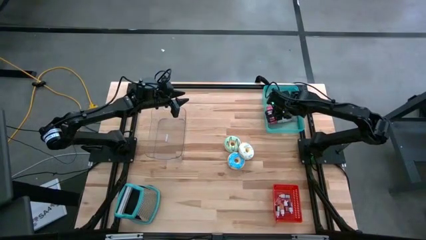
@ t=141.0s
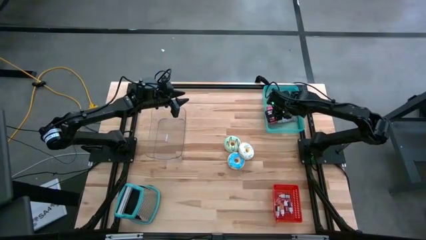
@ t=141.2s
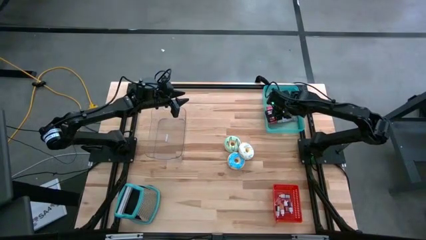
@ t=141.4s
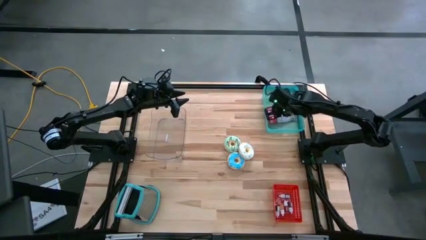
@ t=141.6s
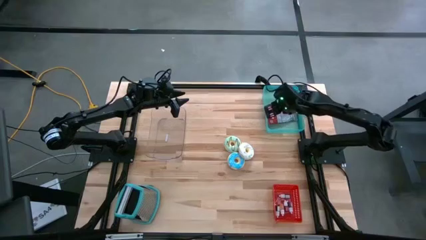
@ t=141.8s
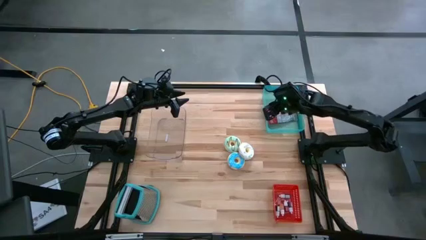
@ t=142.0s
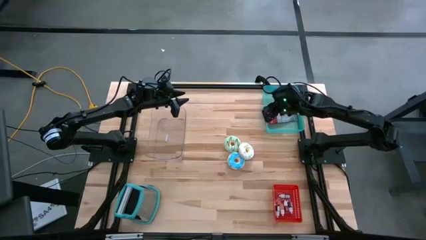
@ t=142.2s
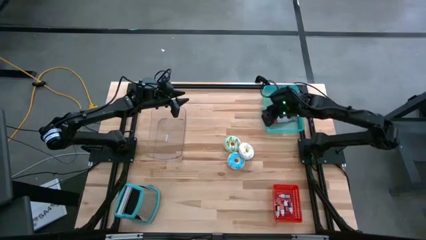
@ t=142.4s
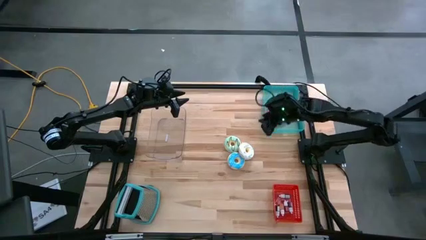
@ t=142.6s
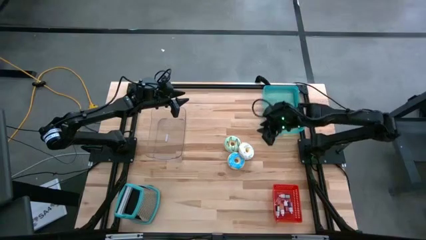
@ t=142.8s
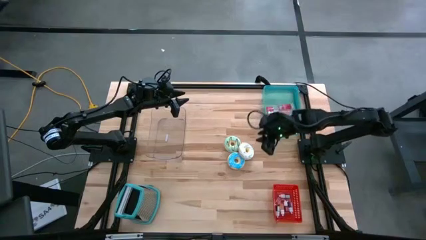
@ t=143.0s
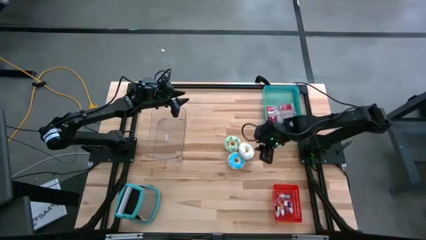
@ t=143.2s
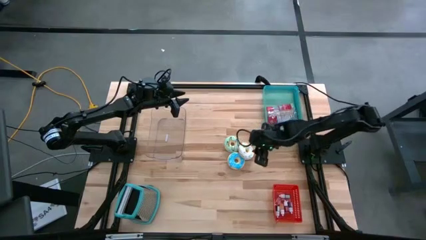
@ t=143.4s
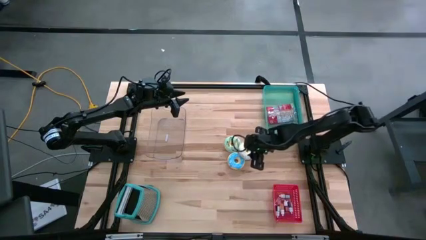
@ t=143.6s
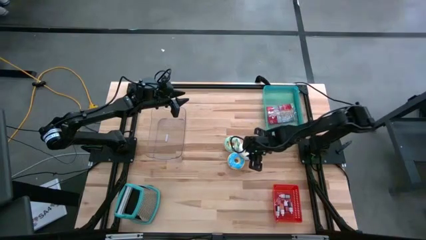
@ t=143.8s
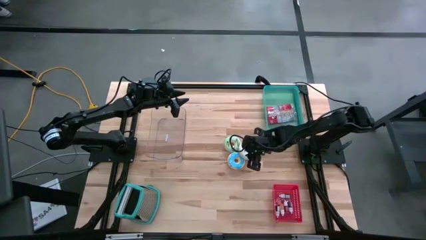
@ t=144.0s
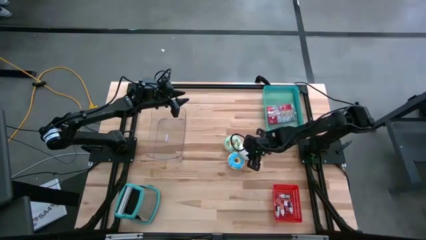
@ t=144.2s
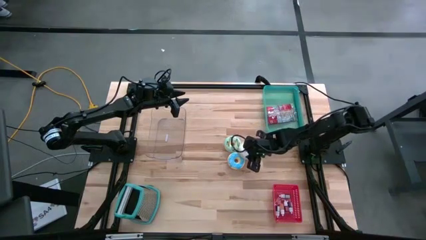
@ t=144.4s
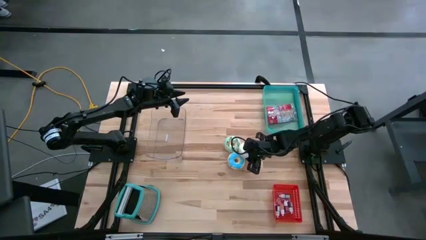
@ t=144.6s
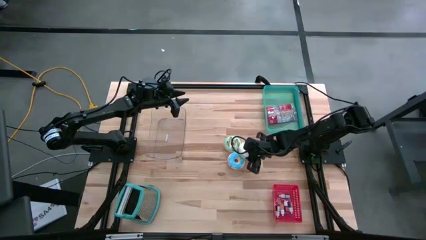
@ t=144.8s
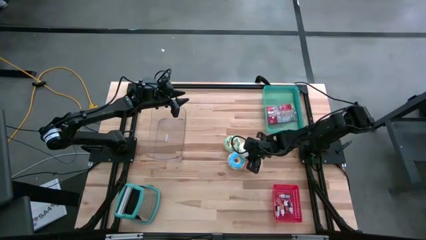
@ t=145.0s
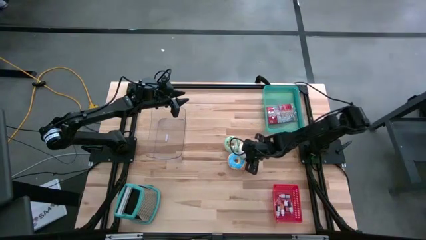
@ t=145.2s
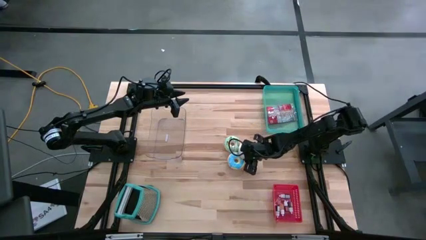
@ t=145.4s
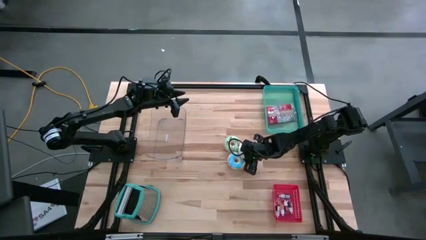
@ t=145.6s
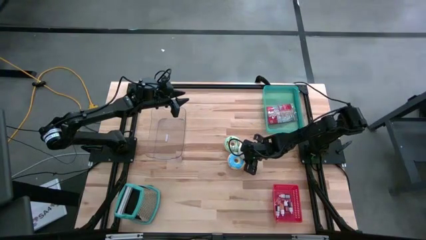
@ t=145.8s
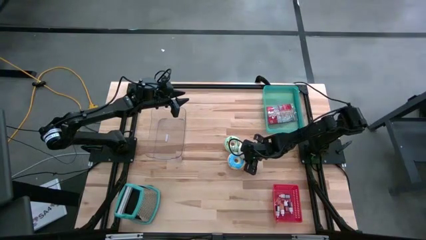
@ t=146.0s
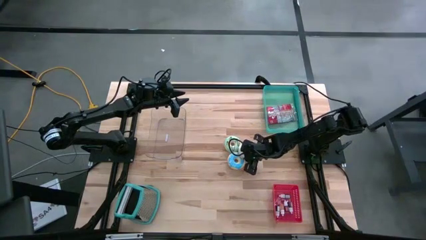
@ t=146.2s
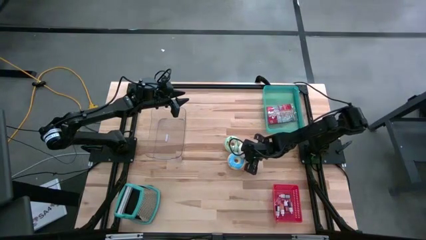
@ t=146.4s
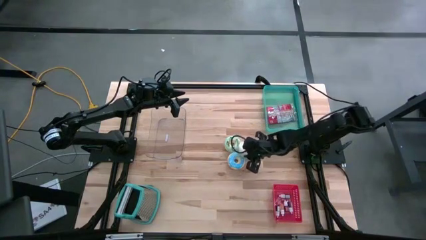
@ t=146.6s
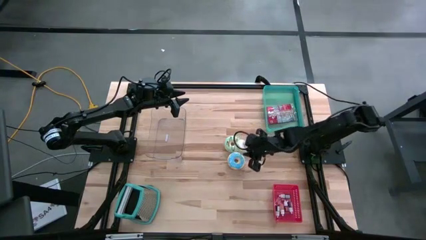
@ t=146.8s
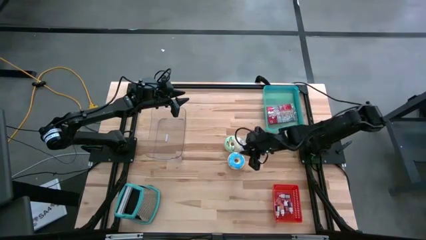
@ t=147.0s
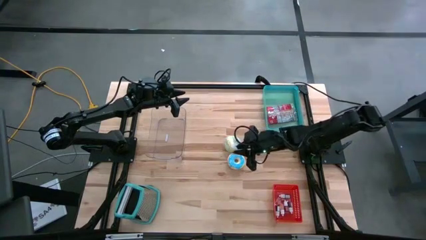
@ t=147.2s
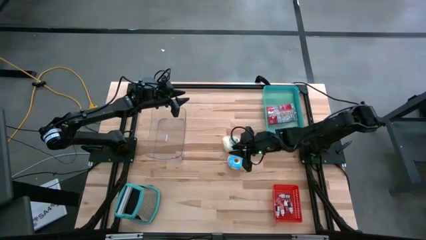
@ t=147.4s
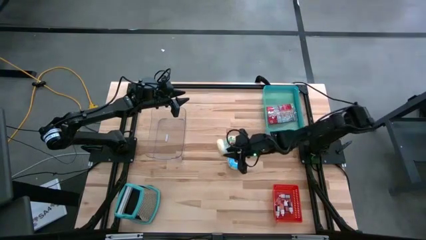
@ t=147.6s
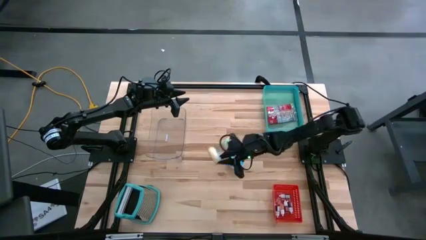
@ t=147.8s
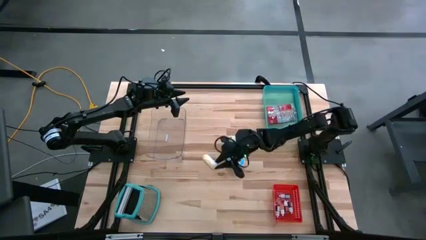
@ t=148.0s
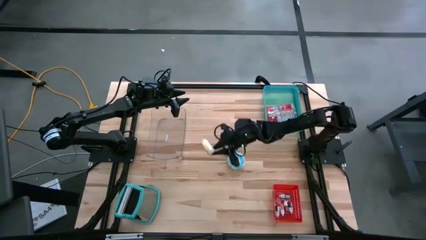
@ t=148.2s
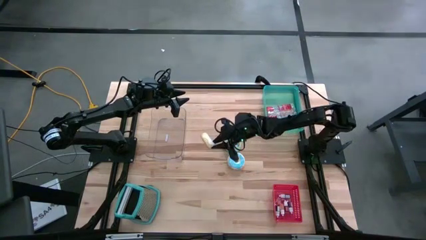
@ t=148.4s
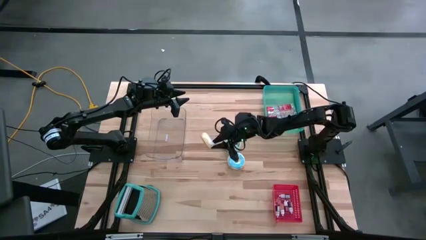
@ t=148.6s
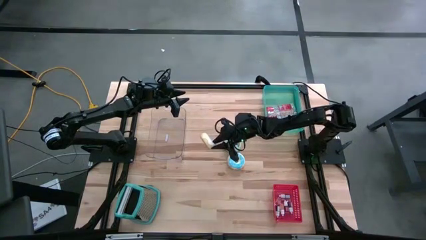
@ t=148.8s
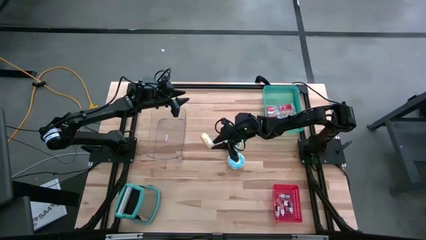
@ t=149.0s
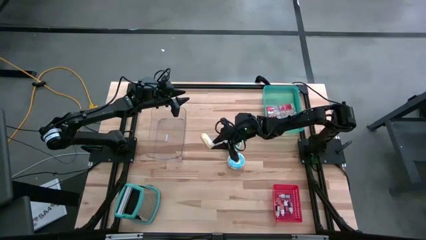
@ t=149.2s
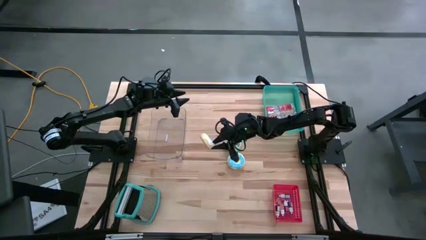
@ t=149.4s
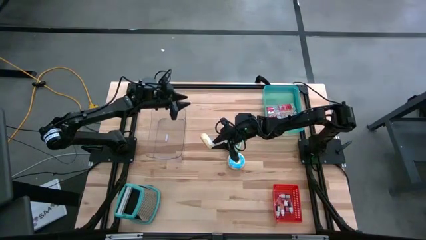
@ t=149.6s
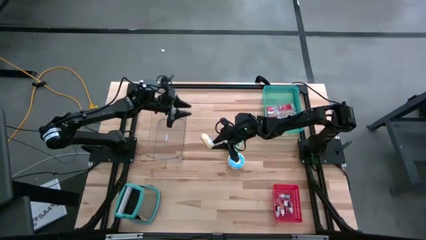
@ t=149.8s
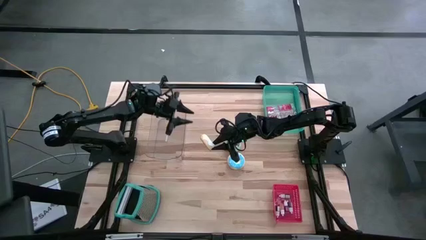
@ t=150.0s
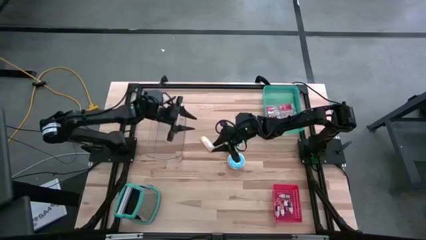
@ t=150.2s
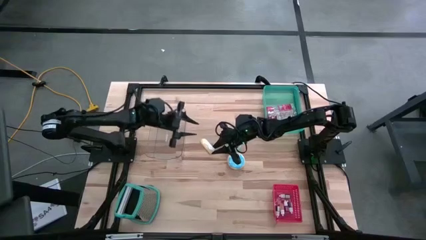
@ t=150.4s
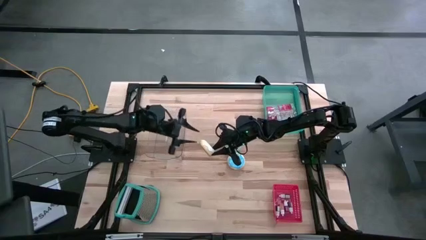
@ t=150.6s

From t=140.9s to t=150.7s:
Put the white doughnut into the transparent bin

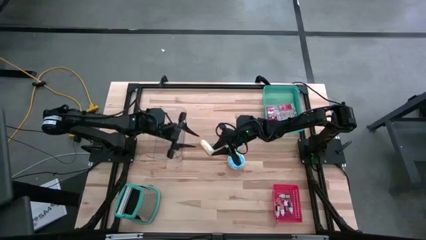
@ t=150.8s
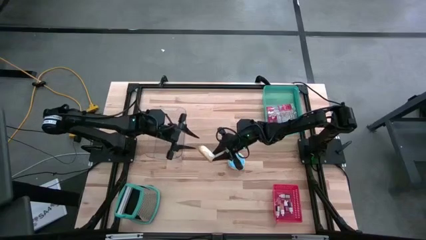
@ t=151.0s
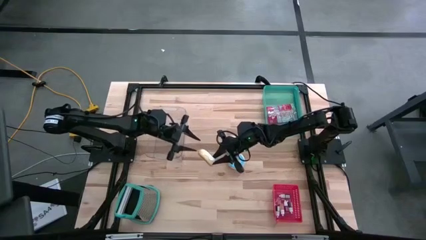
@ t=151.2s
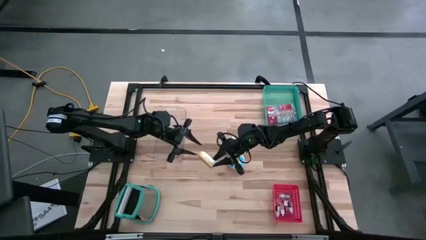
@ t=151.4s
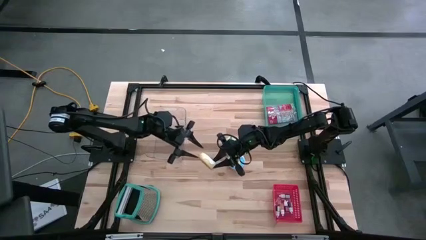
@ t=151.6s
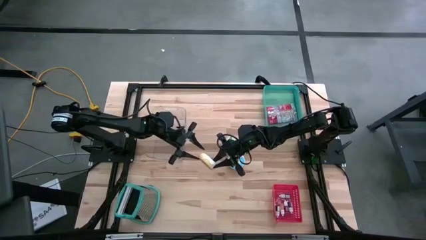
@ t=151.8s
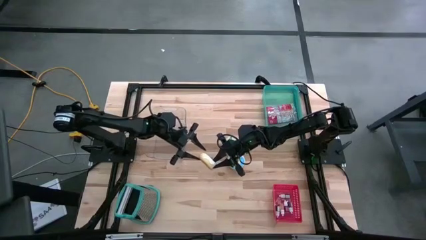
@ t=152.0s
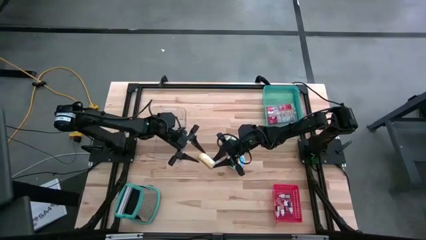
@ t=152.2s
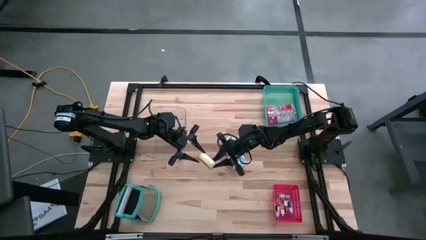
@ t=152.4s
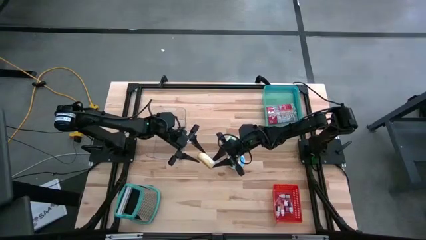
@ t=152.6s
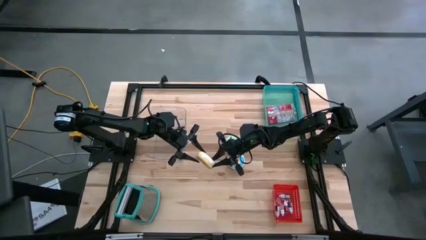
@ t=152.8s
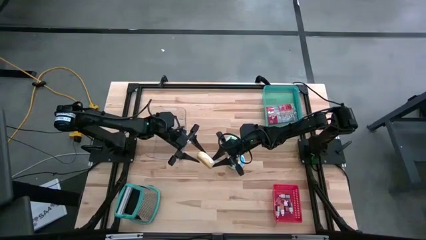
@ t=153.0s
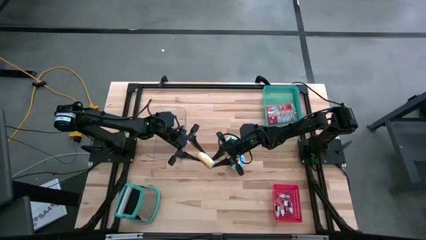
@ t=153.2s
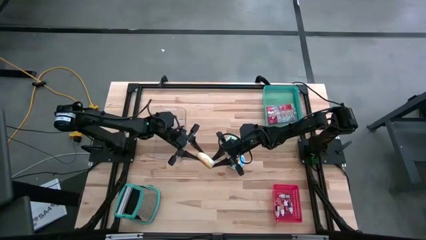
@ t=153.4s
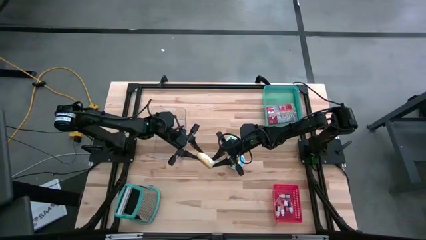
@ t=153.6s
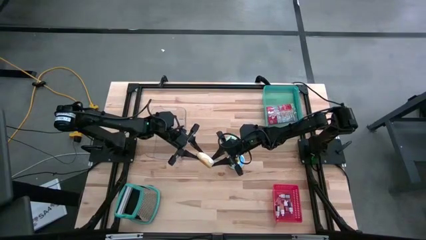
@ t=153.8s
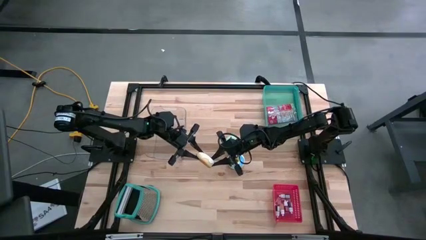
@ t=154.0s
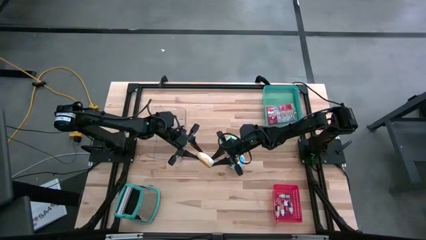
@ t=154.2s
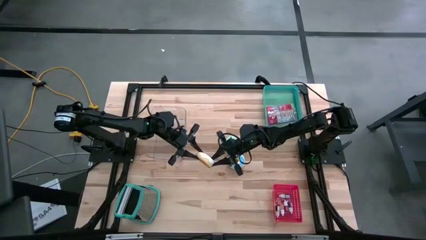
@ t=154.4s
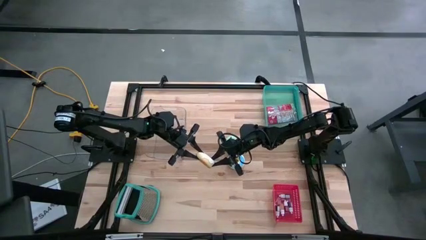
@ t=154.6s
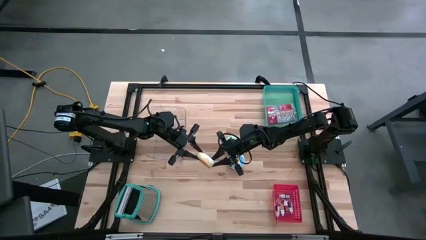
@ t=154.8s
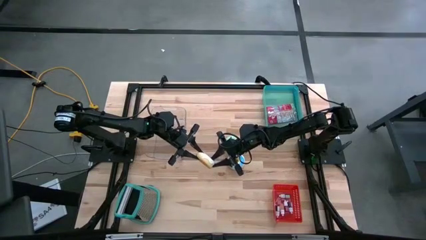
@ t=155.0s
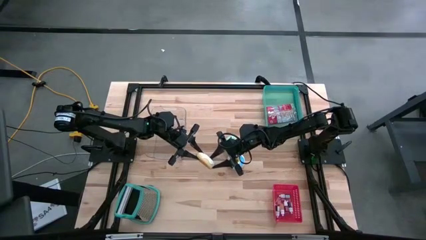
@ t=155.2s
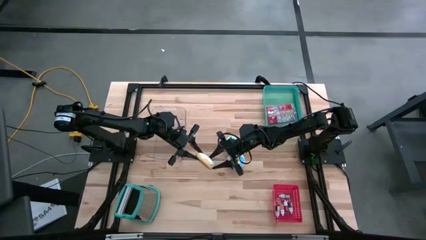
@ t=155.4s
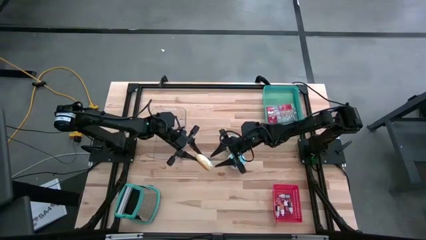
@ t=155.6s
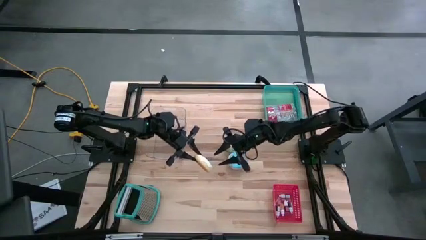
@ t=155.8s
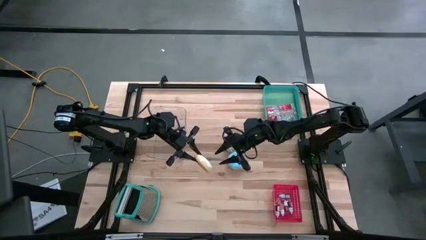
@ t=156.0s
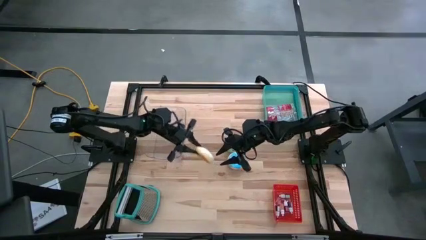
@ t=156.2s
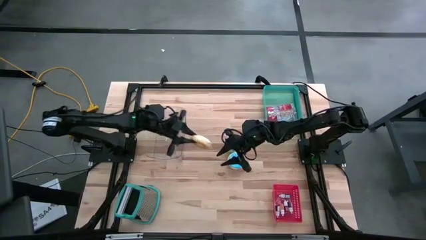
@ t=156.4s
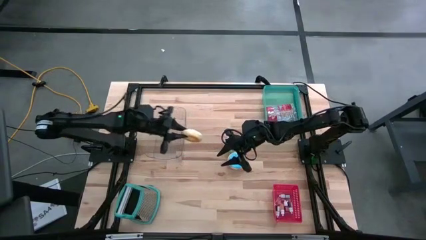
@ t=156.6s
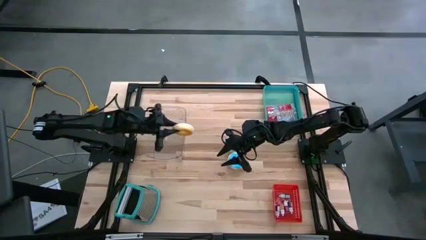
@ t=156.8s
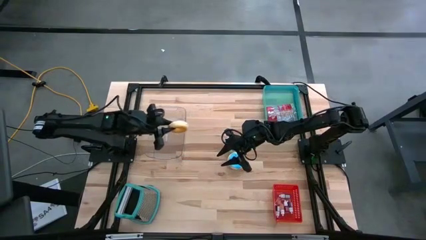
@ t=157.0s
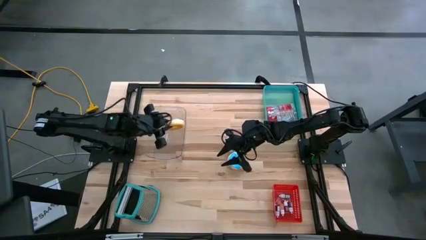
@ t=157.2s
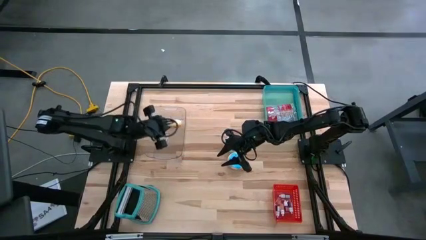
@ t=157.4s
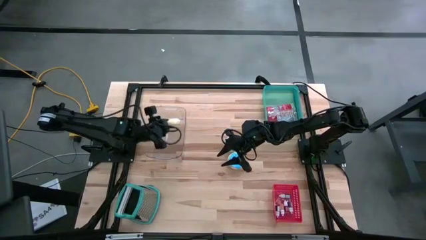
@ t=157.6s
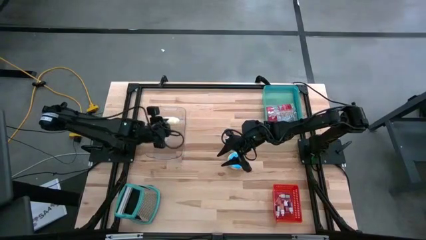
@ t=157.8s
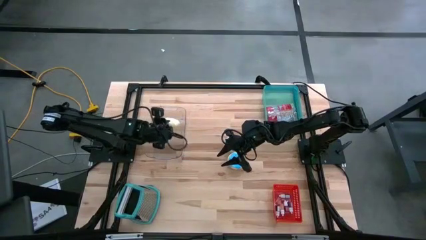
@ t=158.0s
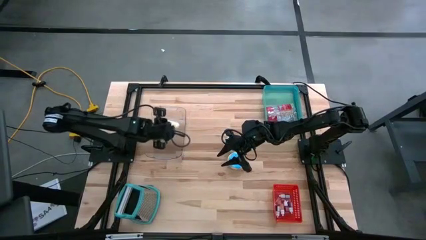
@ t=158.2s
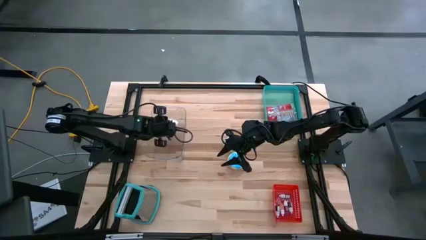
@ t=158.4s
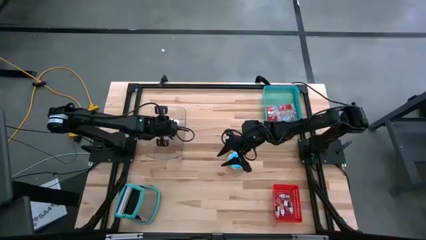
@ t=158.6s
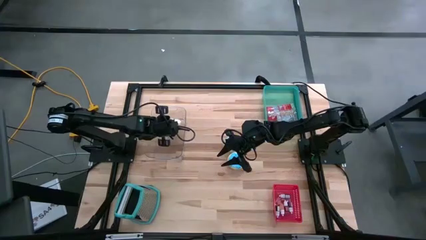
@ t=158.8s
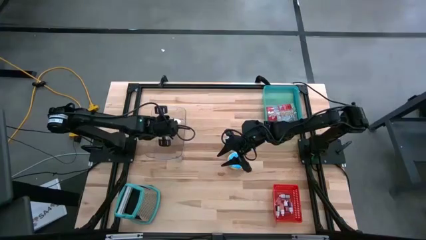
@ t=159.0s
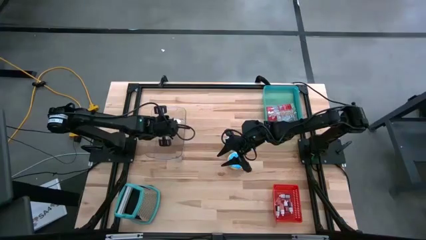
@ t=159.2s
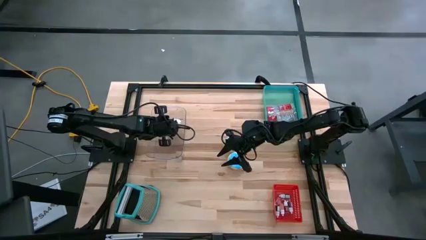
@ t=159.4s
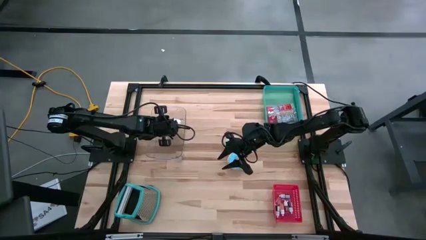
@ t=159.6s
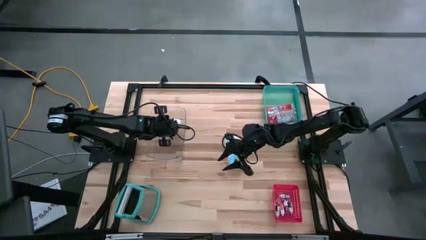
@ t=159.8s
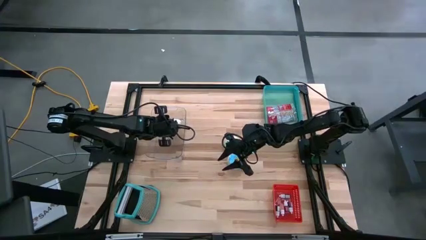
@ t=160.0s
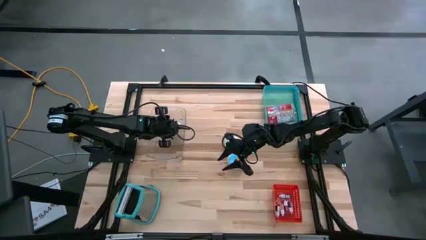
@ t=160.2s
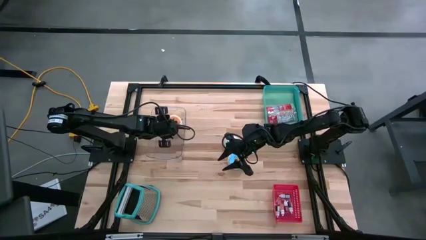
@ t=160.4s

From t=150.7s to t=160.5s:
Put the white doughnut into the transparent bin
